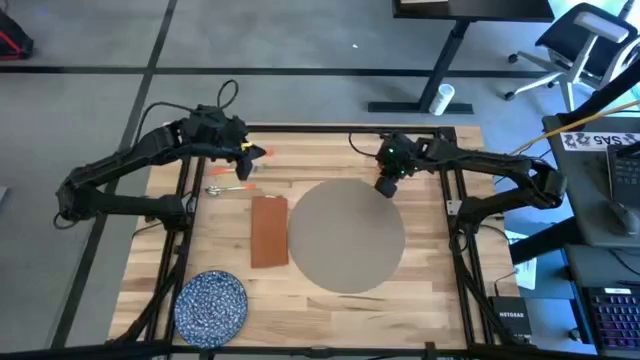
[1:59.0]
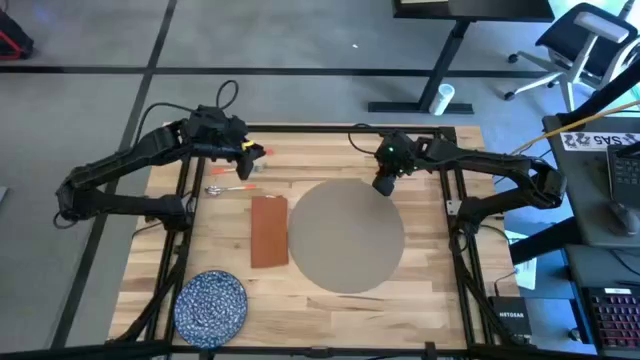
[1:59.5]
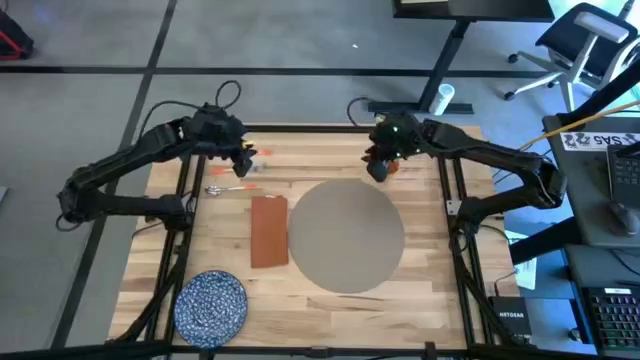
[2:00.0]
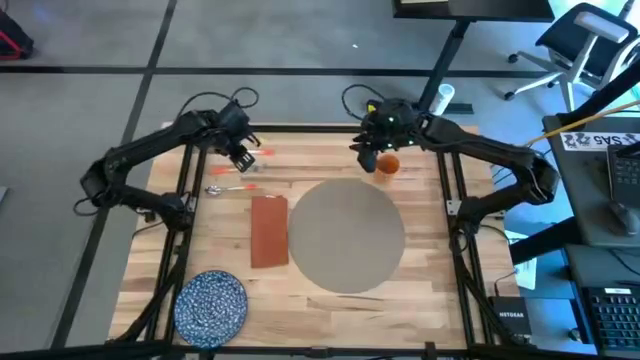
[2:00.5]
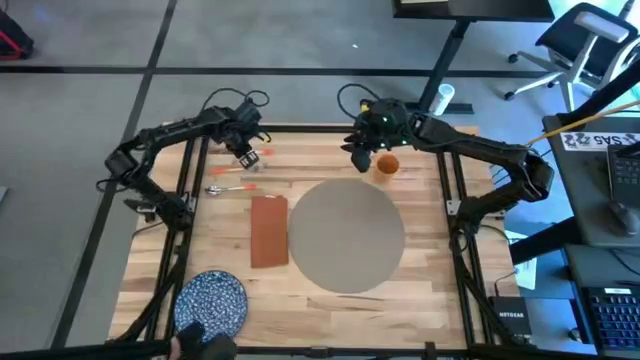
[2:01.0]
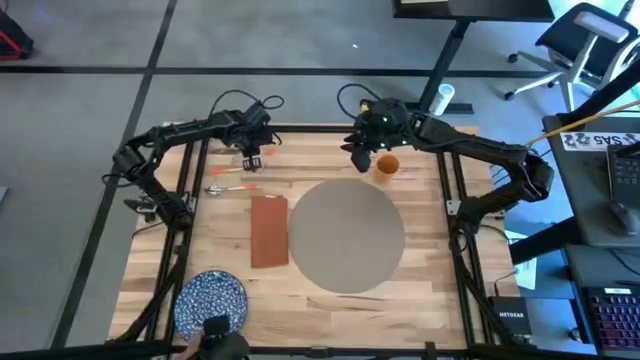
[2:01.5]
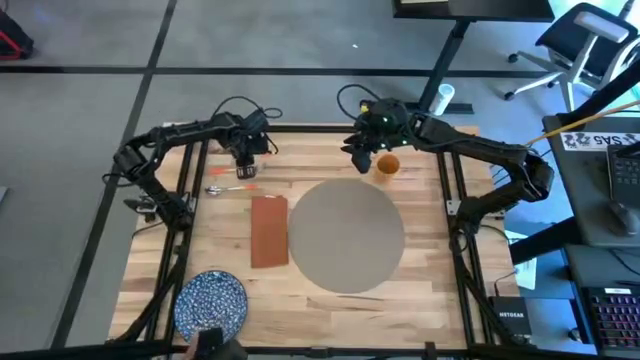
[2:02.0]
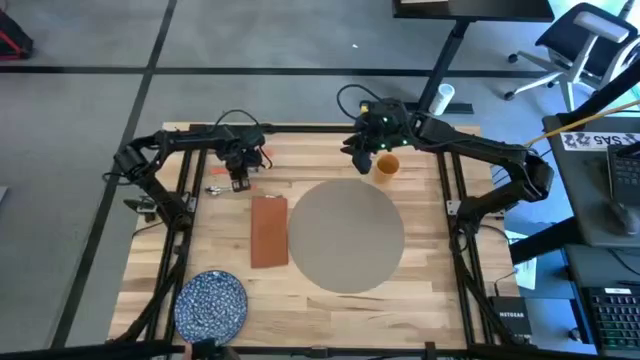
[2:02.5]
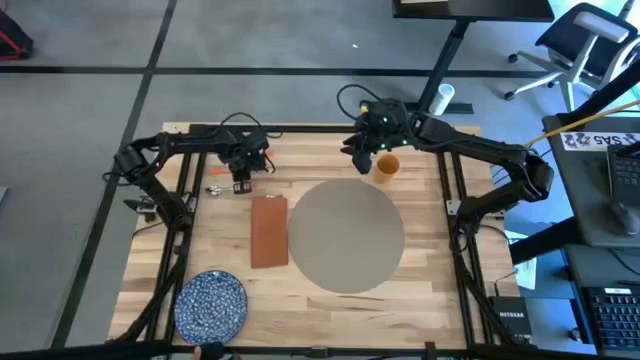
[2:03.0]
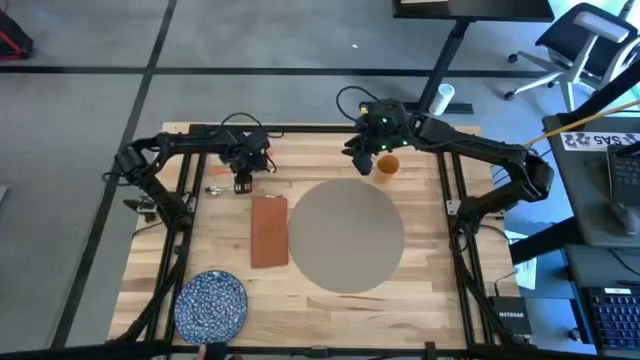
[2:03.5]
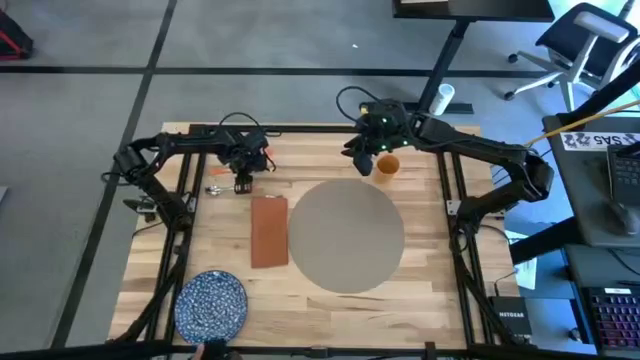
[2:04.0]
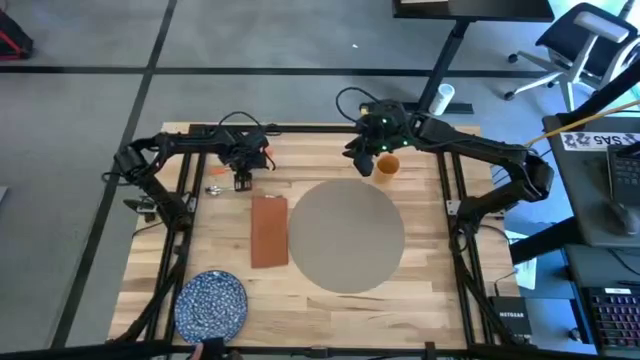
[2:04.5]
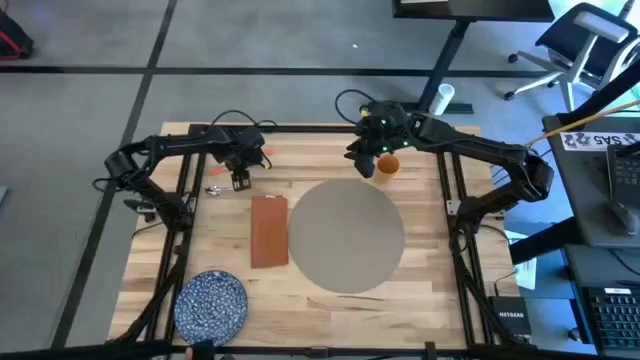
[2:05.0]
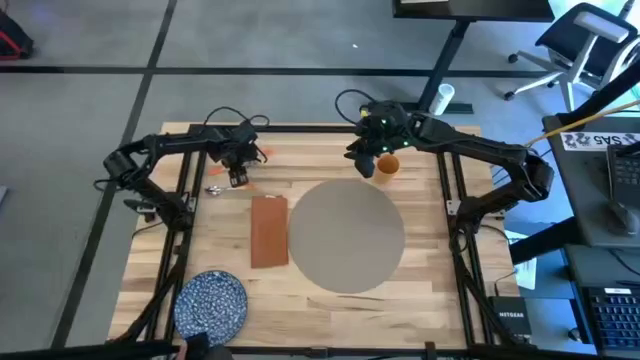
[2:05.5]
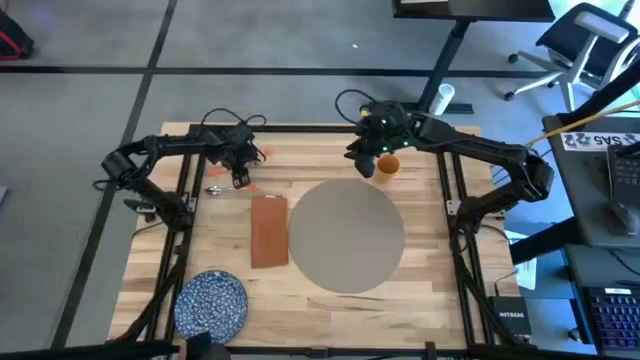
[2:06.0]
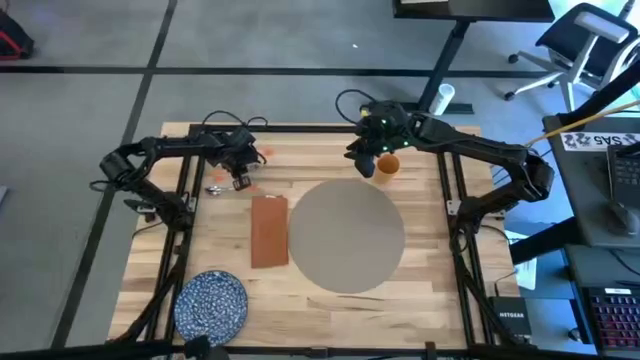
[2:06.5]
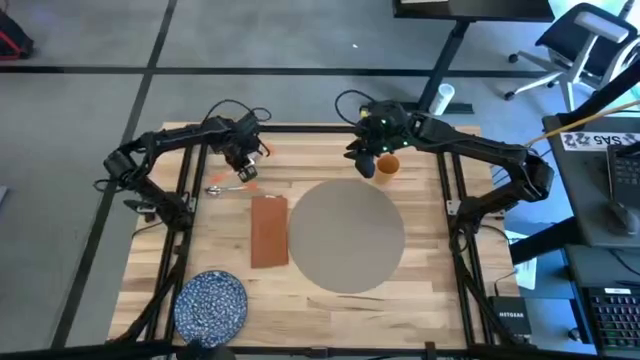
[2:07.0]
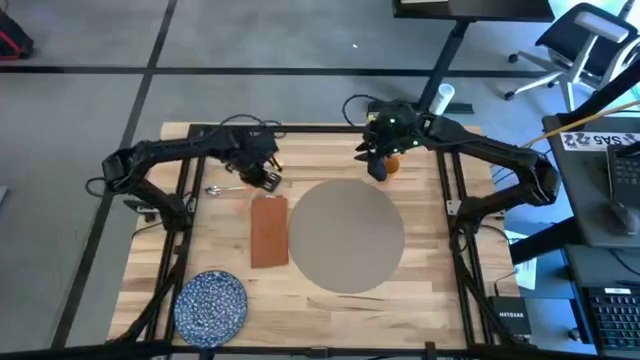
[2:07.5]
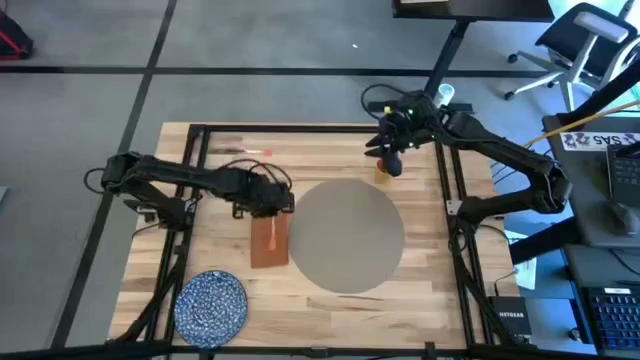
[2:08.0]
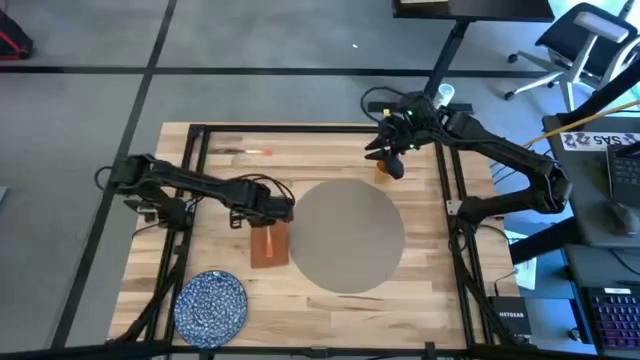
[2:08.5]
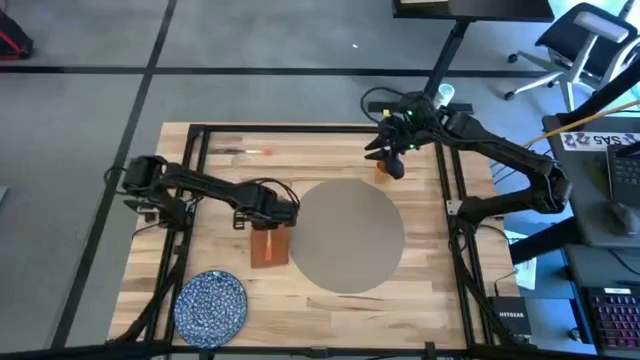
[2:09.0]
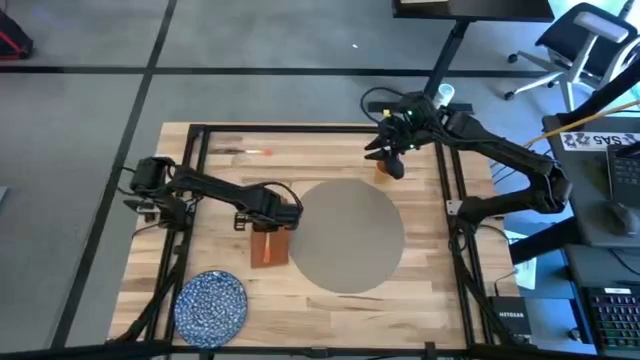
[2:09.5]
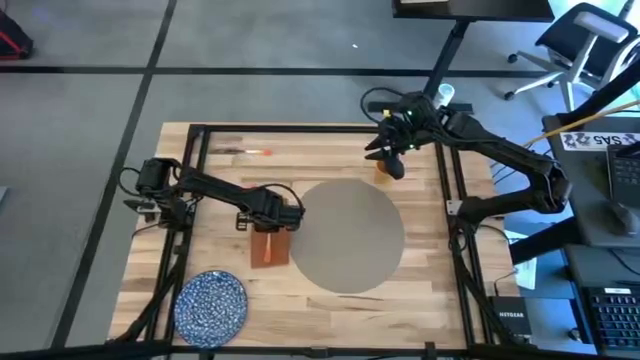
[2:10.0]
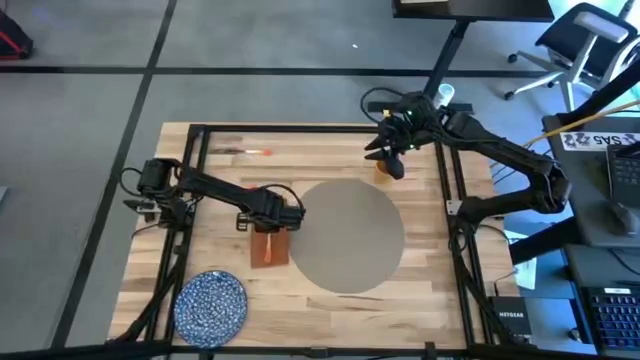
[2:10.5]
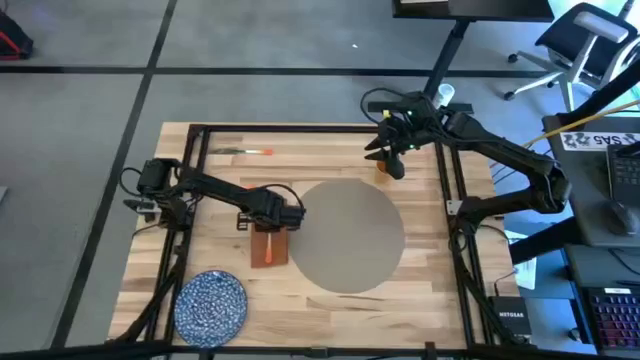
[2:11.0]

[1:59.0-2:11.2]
Task: Set table place
Put the orange fork on the orange napkin

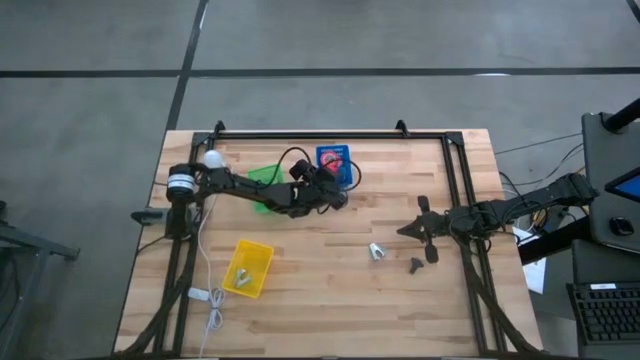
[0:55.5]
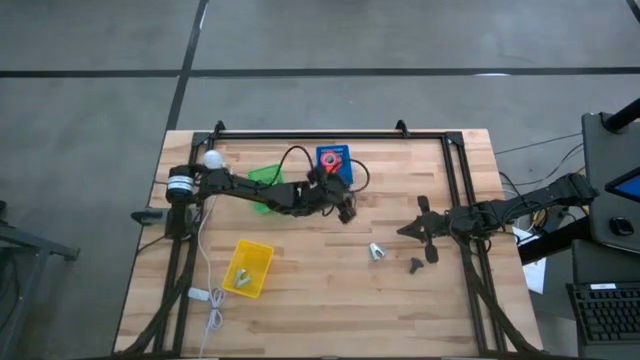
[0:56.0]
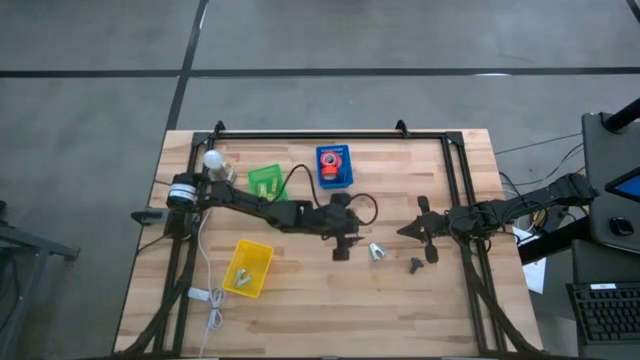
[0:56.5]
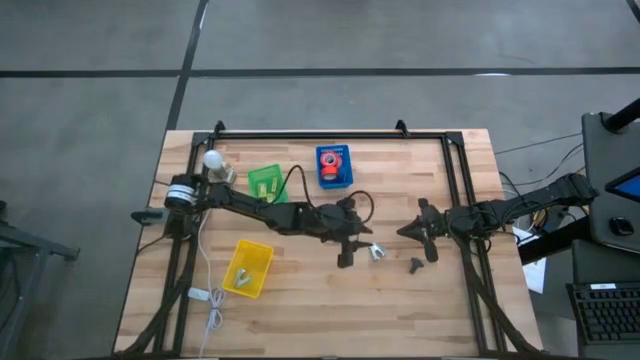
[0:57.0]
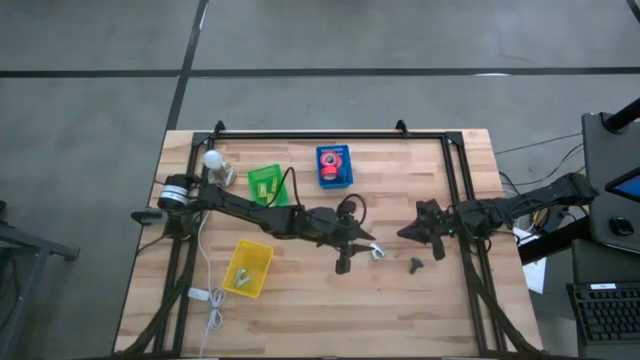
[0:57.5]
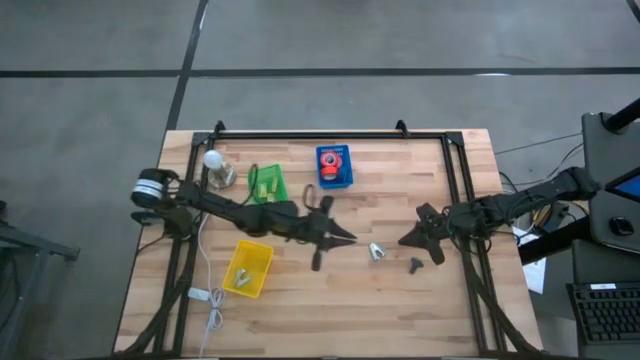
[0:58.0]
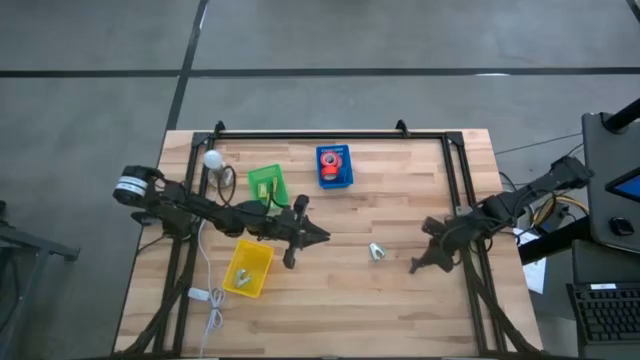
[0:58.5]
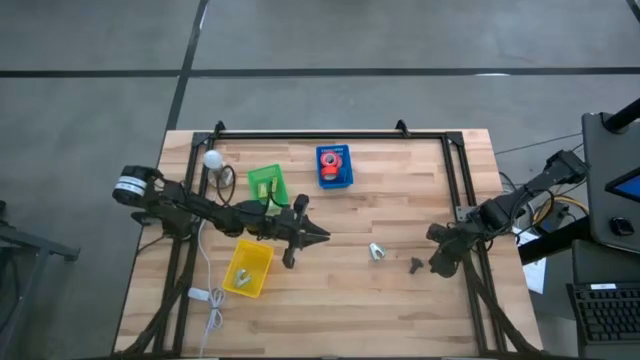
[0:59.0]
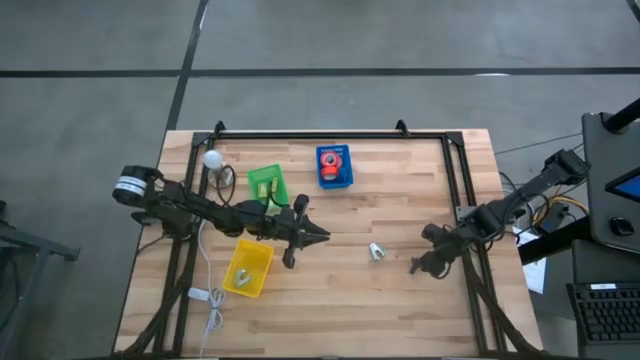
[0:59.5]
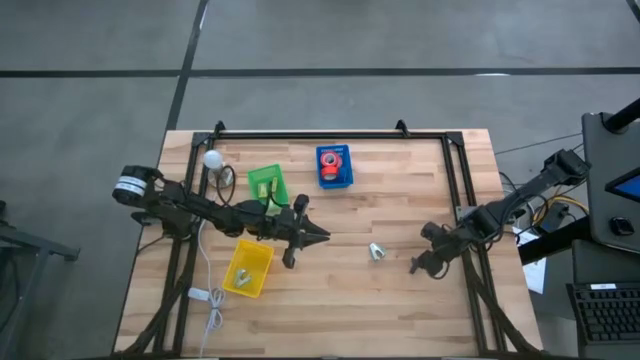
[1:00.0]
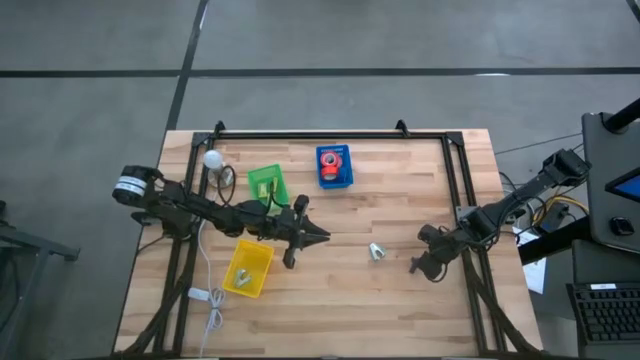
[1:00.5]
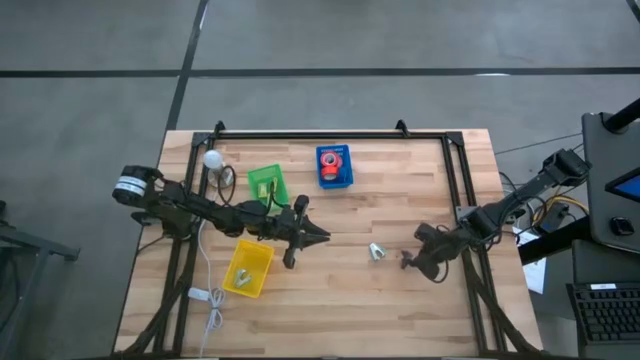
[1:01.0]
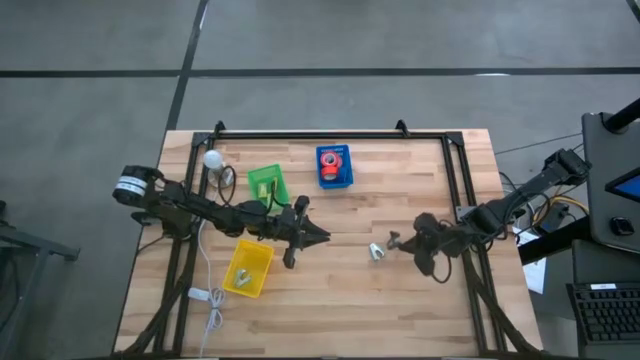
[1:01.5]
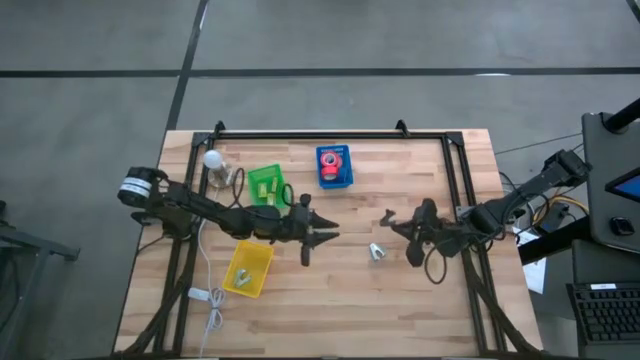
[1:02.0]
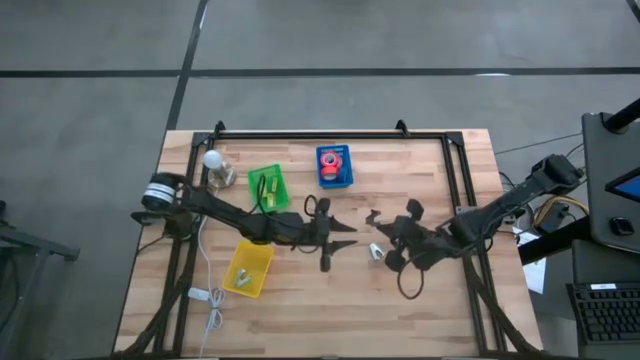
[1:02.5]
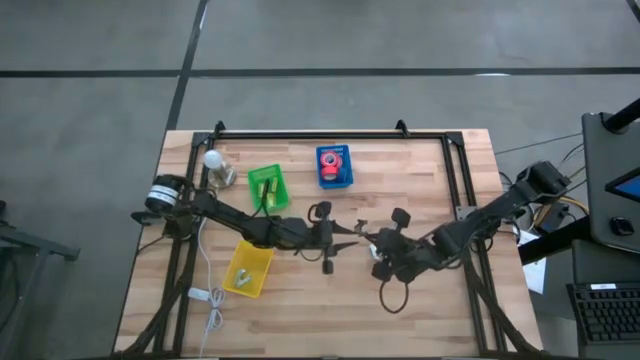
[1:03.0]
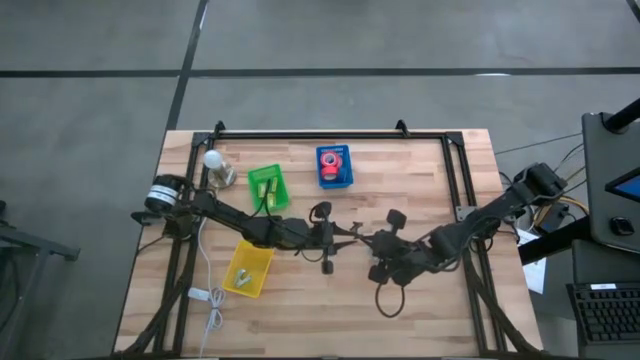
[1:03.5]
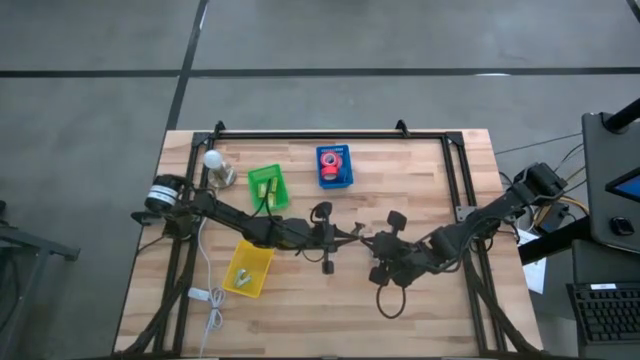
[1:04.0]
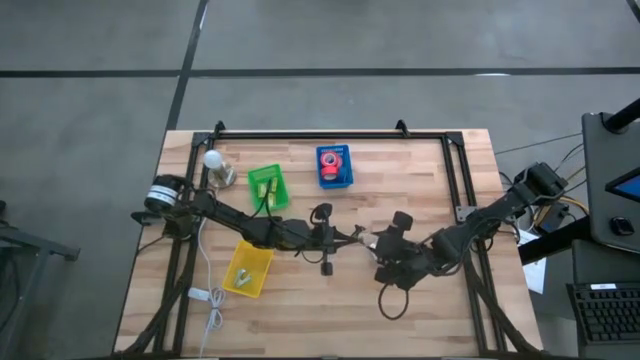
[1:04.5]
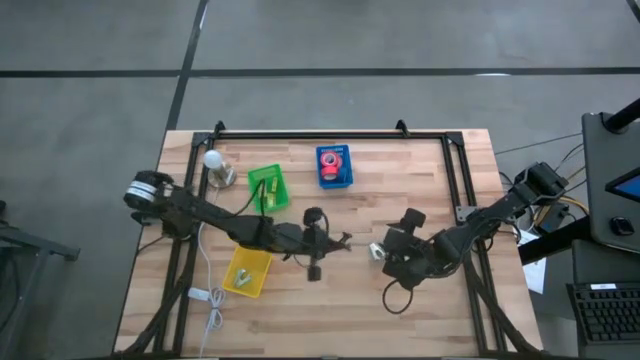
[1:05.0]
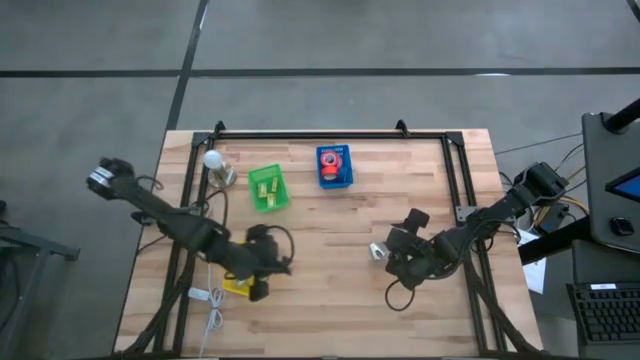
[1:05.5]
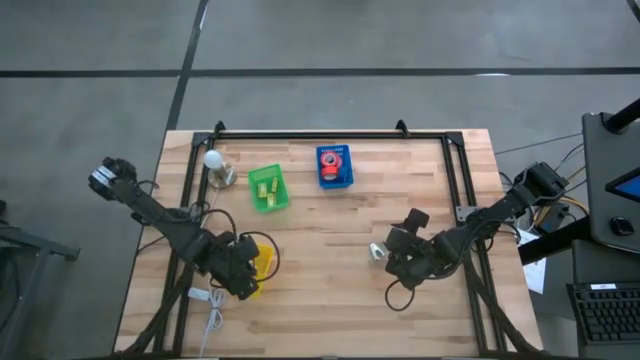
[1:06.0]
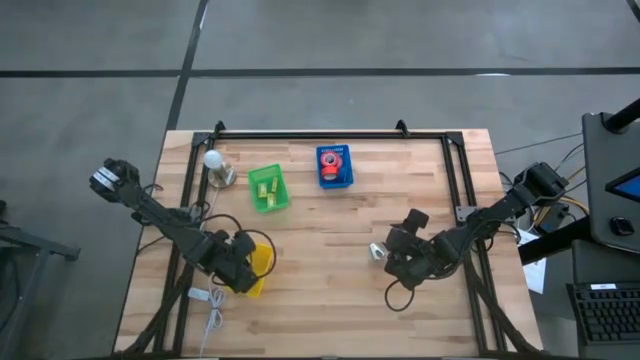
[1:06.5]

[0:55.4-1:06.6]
Task: Pick and place Stapler, Stapler remover, tape
Put the black staple remover into the yellow bin
